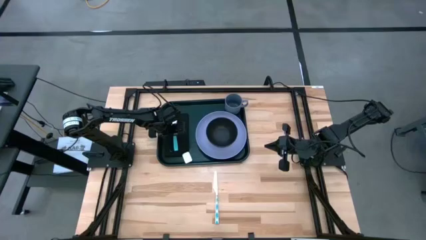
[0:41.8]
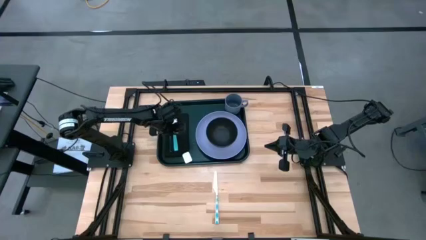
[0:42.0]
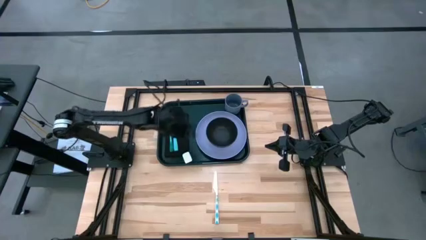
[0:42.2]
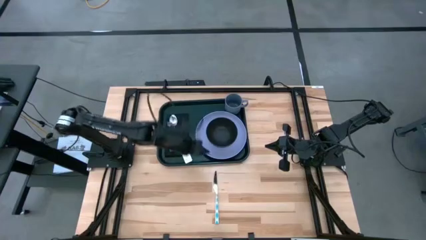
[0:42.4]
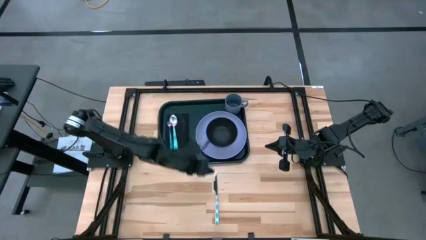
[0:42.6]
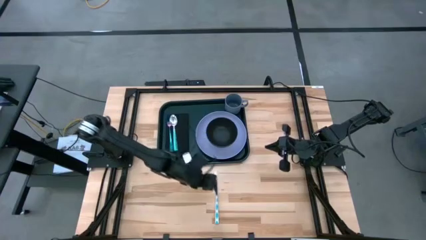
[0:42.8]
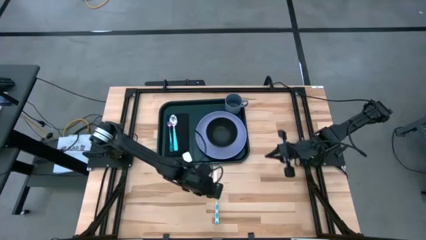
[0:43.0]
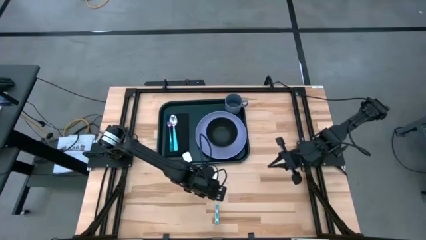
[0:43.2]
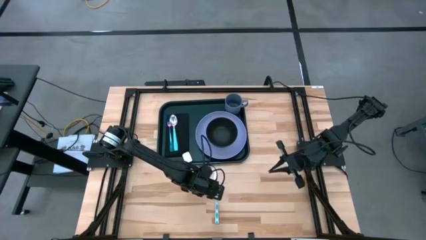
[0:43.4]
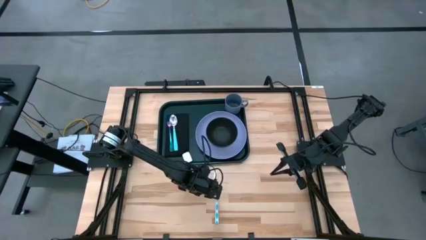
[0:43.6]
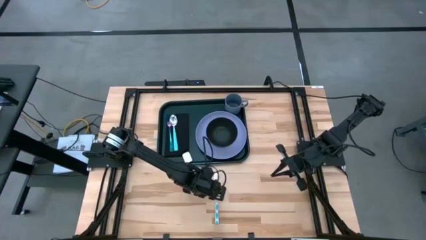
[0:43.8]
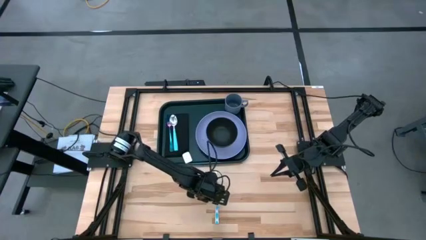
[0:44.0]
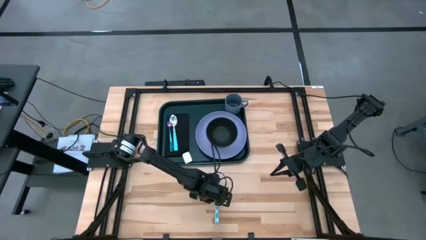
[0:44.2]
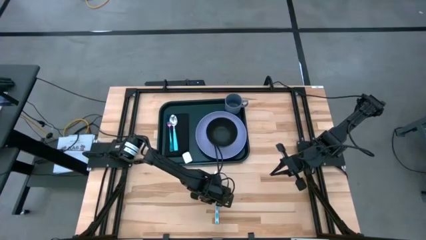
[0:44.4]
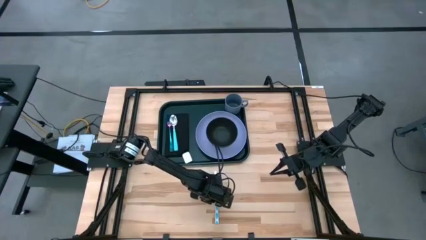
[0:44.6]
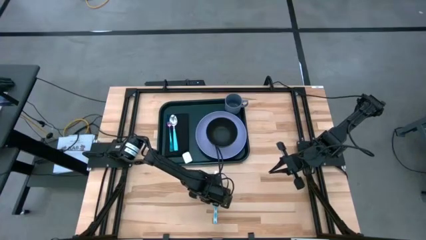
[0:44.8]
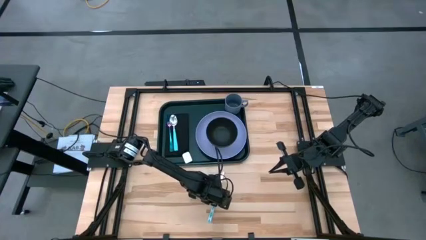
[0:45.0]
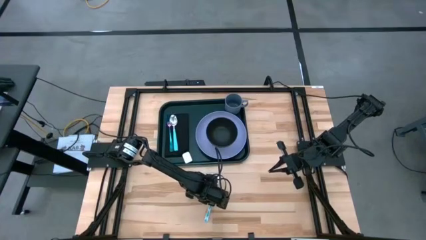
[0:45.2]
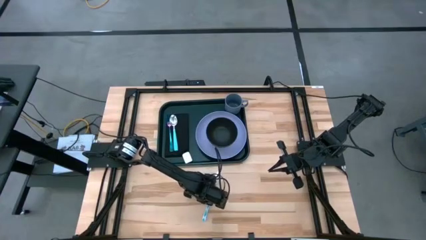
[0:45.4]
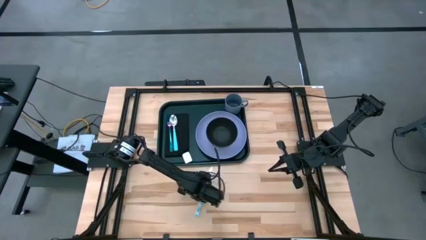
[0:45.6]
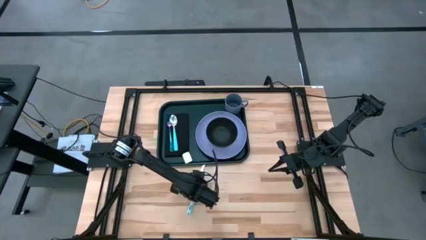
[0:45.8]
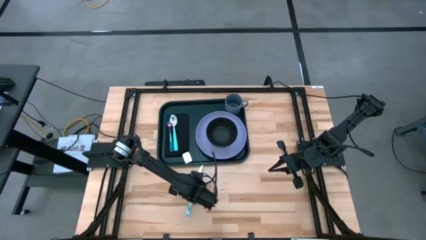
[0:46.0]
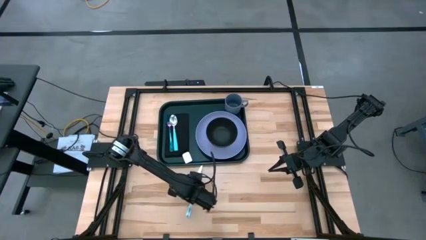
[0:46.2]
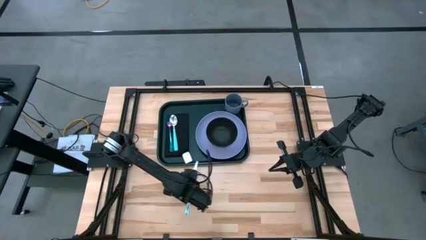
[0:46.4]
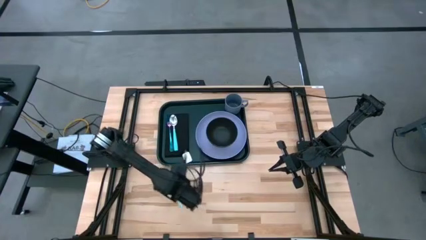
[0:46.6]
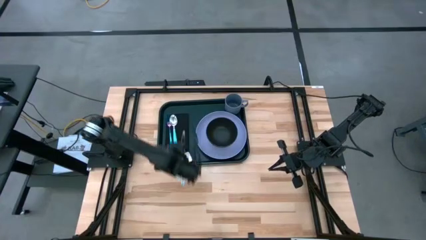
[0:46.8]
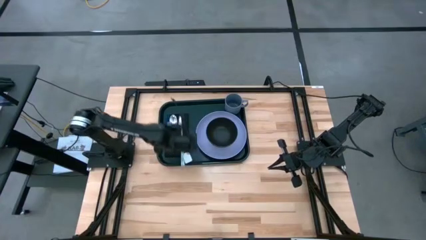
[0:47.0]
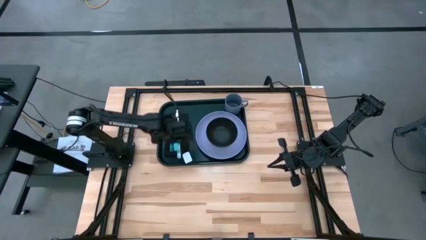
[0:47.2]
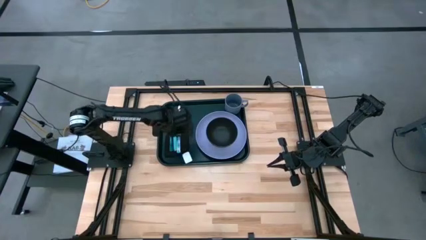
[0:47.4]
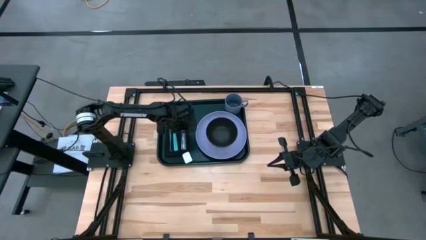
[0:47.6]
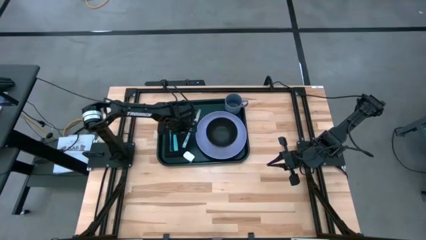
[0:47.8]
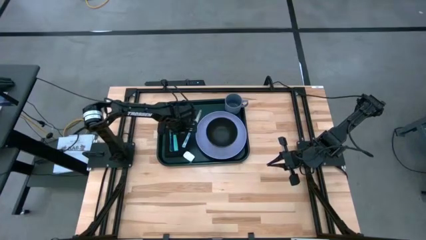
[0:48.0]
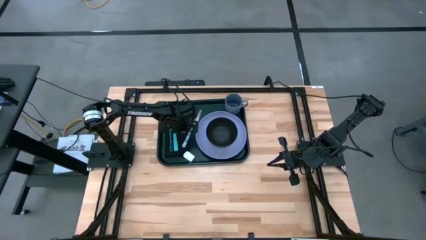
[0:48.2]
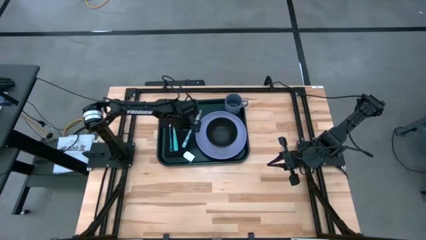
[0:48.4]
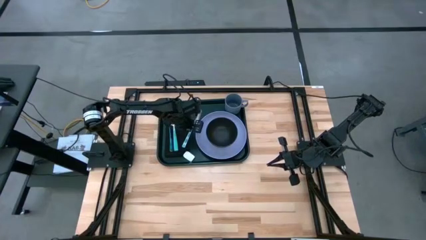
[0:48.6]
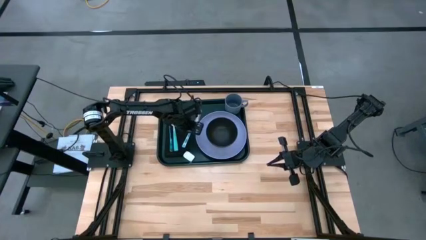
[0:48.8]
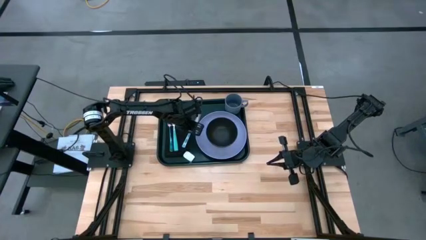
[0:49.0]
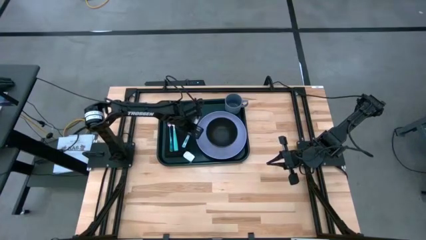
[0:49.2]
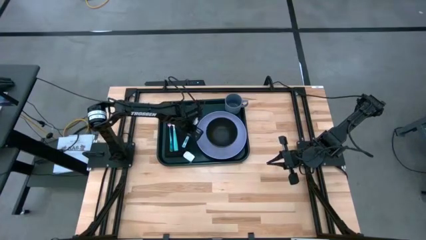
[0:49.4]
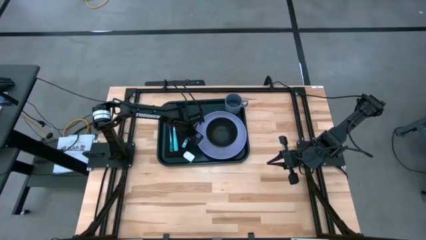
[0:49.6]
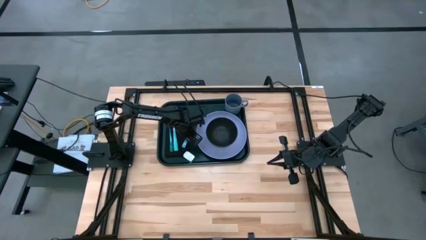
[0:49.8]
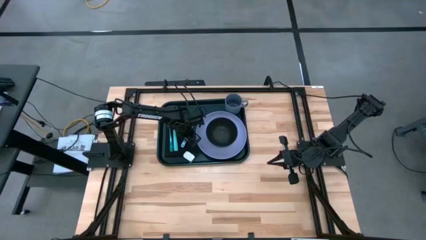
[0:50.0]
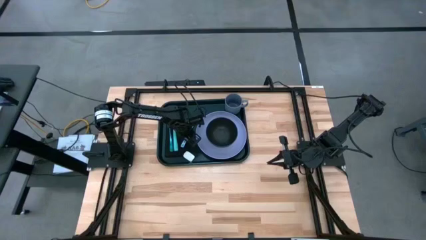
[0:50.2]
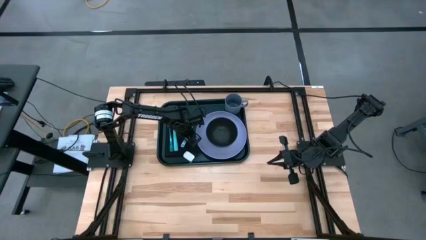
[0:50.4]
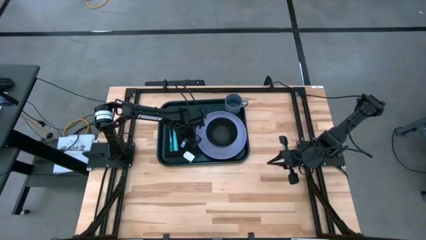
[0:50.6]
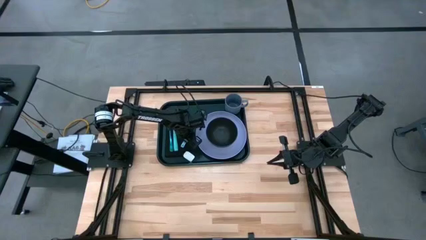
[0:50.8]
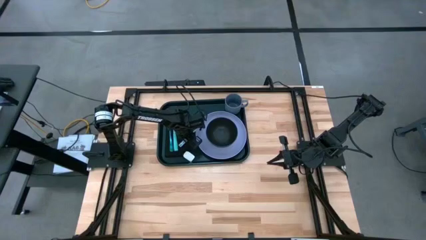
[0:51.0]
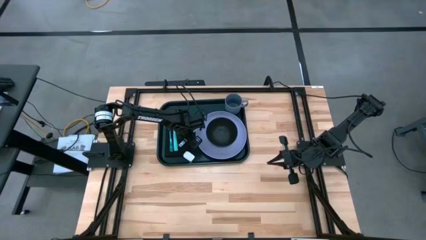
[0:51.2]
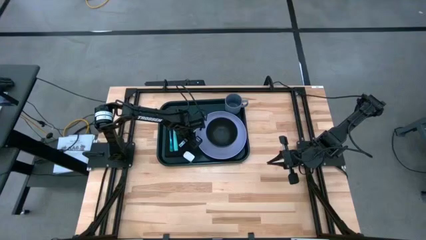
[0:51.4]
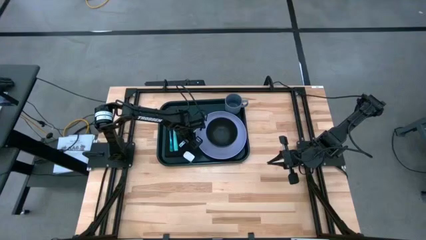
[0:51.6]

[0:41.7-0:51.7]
Task: Set up tray
Put the white knife on top of the black napkin to the right of the light blue spoon on the black serving tray

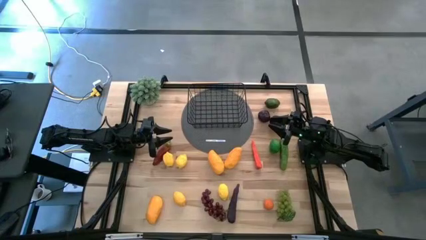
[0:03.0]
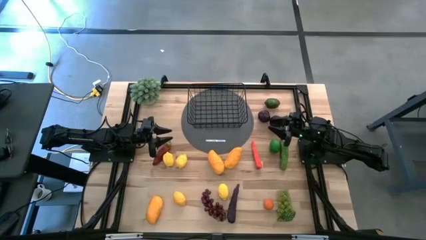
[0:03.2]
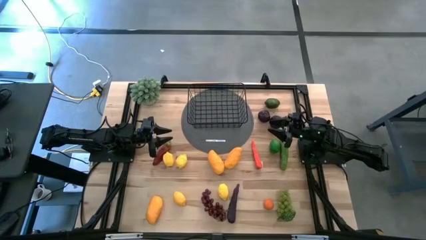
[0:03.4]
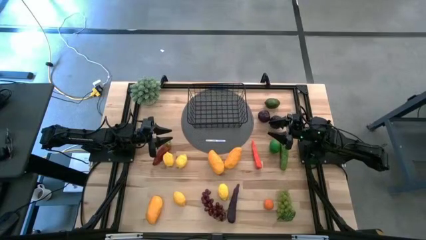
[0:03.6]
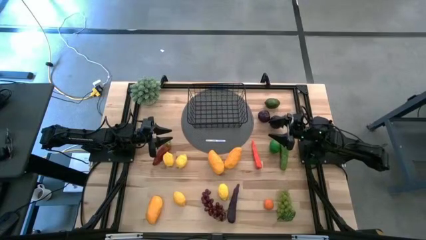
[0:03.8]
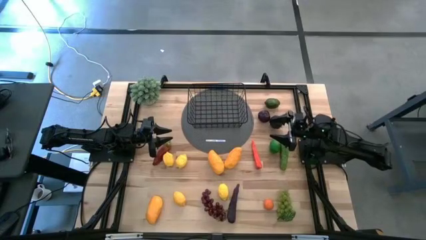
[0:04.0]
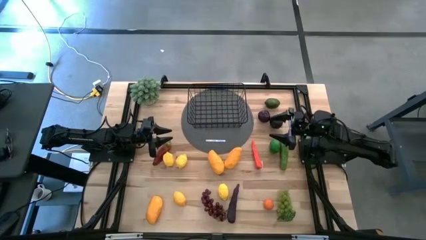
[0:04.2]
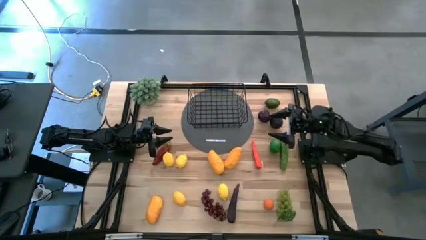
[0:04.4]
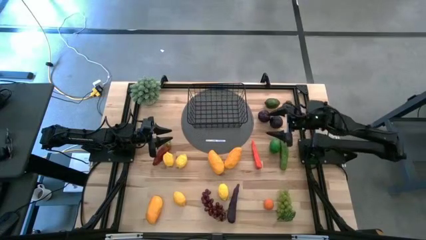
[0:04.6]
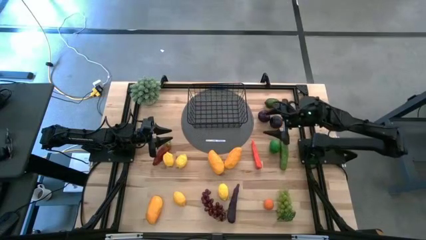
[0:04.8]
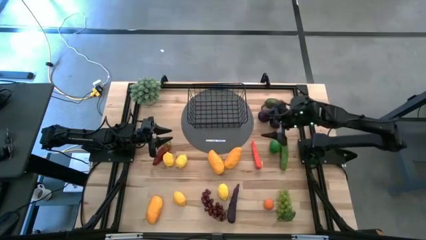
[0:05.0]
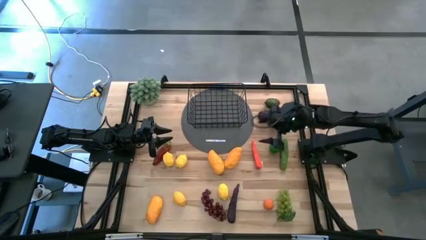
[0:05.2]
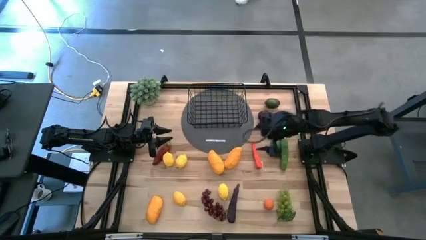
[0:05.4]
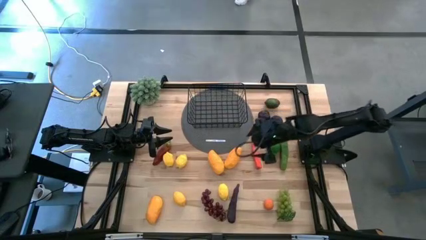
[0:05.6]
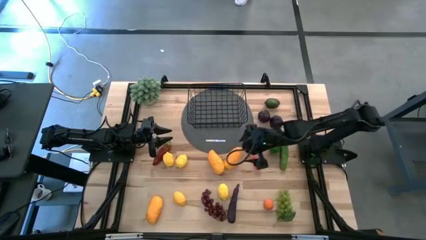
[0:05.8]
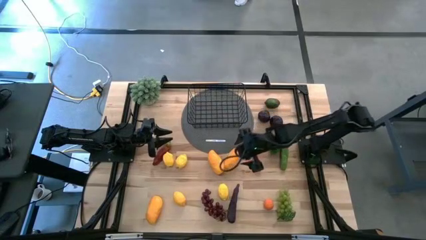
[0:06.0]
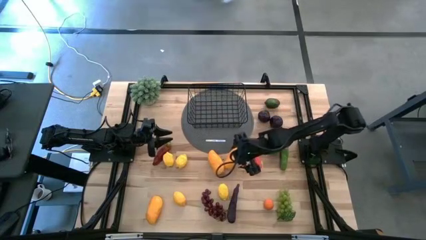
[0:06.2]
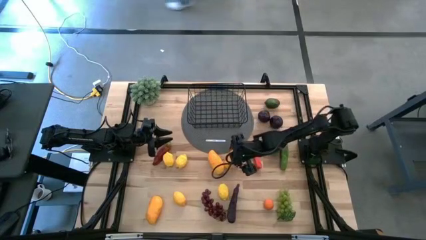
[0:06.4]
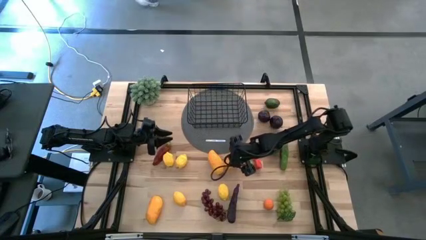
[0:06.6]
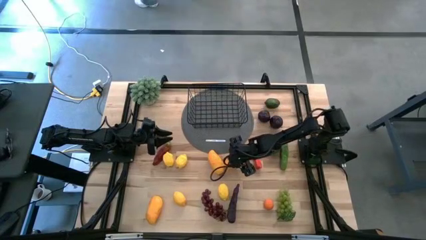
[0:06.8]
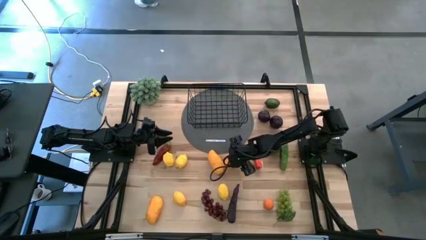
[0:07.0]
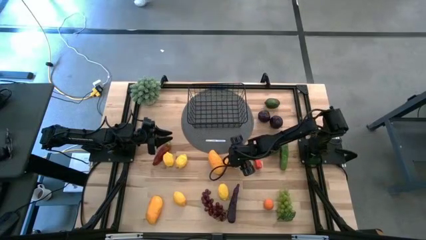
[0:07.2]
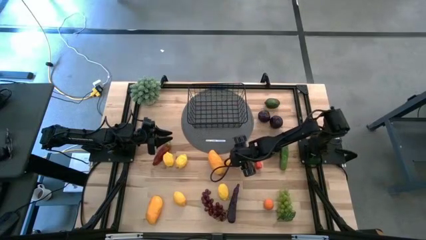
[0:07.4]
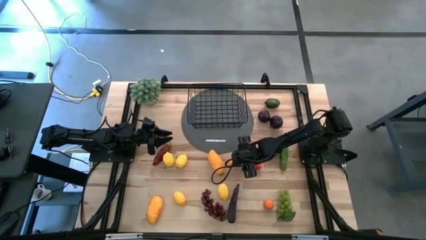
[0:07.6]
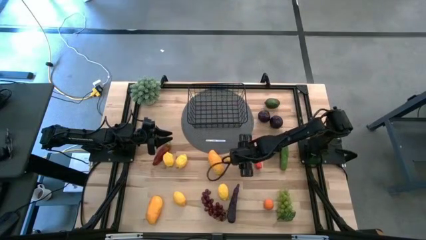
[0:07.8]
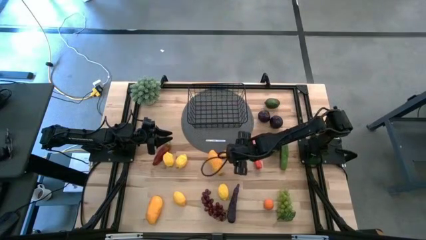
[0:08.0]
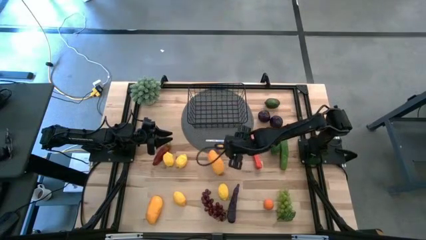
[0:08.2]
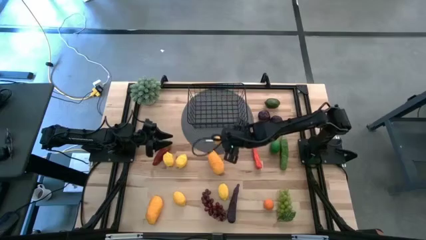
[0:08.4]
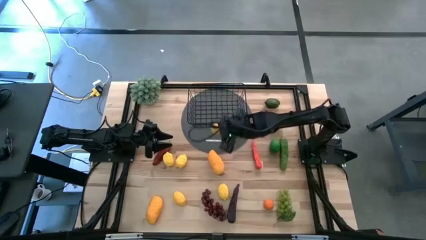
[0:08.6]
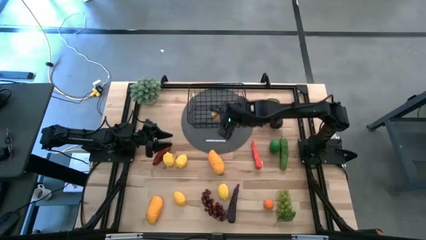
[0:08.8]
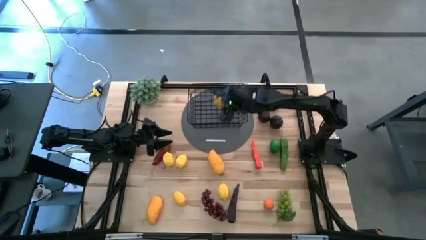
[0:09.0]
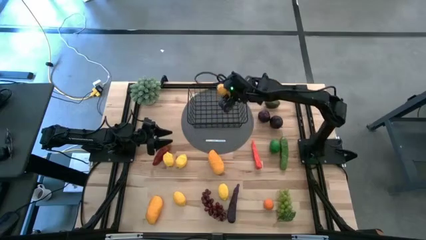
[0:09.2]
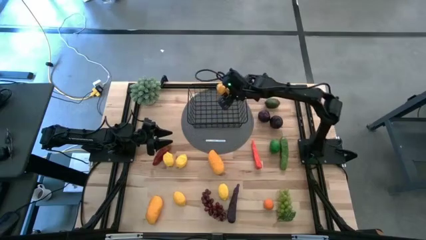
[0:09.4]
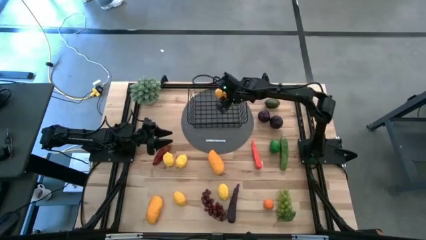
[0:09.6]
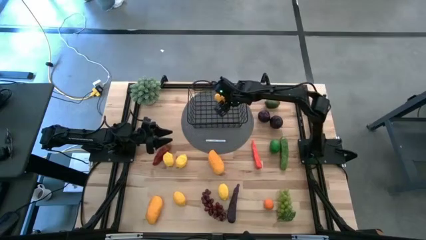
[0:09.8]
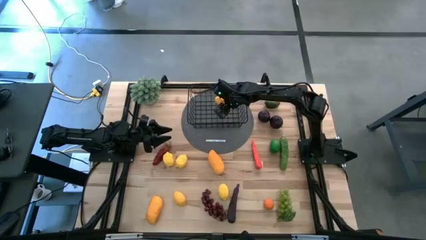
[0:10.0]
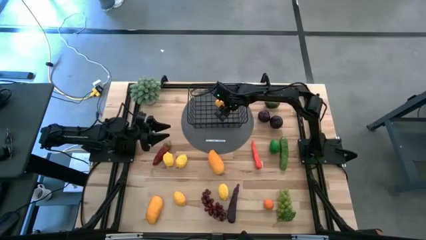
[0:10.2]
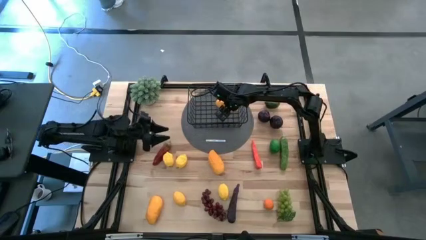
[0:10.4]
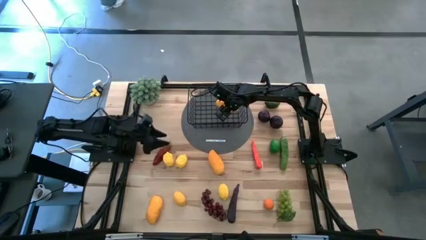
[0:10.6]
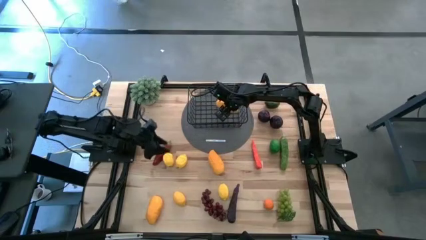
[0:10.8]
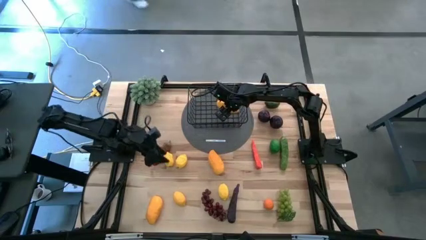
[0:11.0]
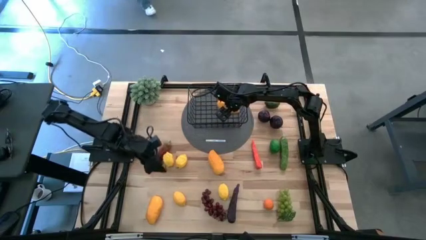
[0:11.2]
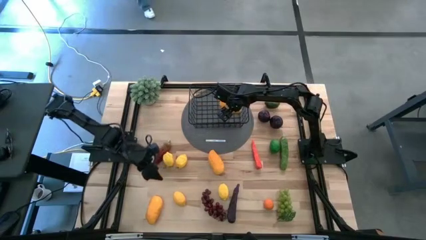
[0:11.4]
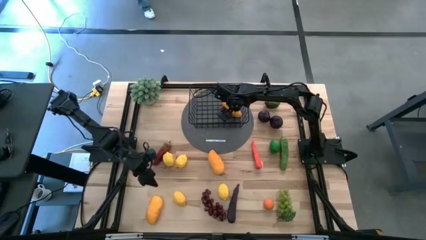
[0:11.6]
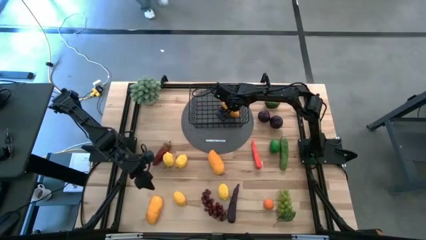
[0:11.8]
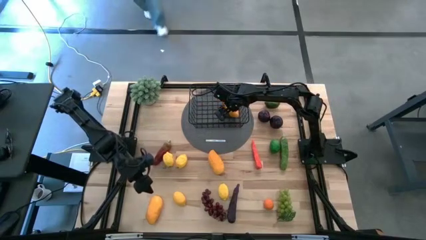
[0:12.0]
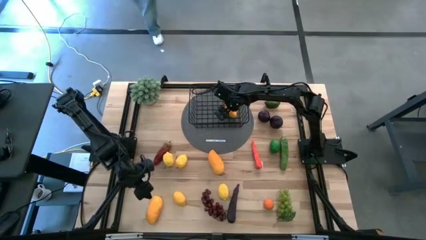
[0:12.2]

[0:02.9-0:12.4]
Task: Build produce basket
Put the right yellow mango into the black wire basket
